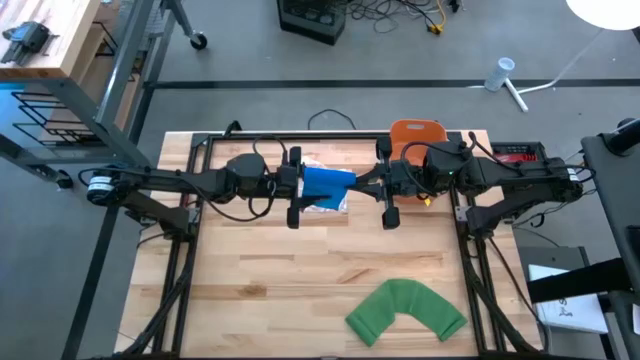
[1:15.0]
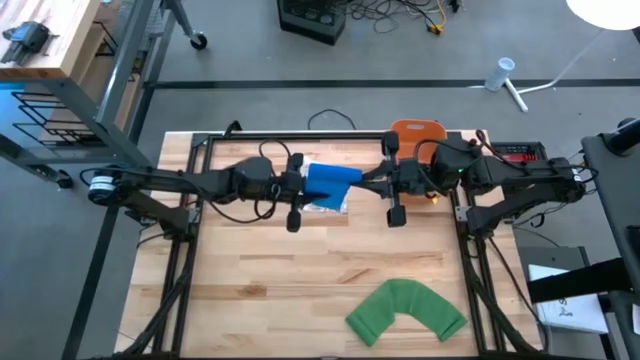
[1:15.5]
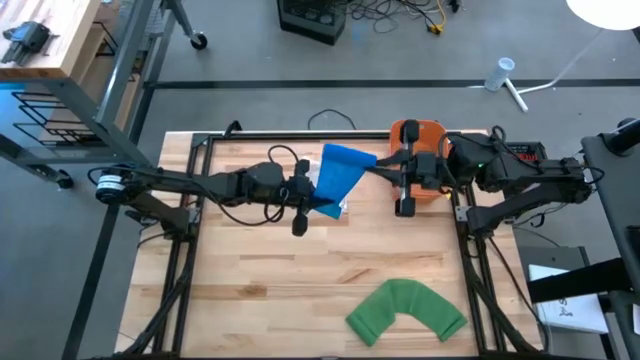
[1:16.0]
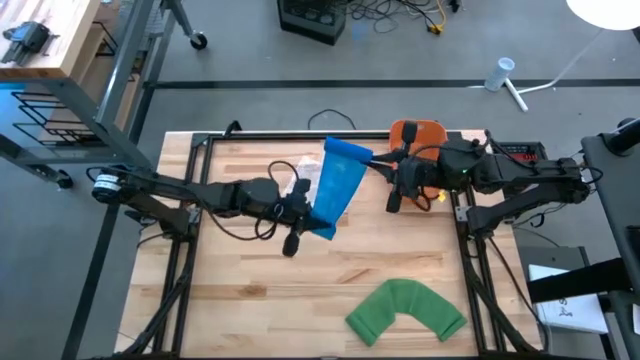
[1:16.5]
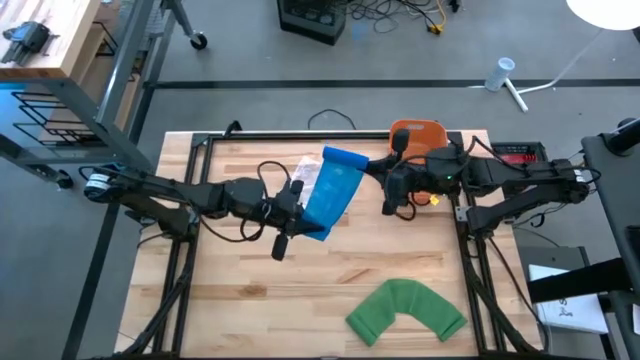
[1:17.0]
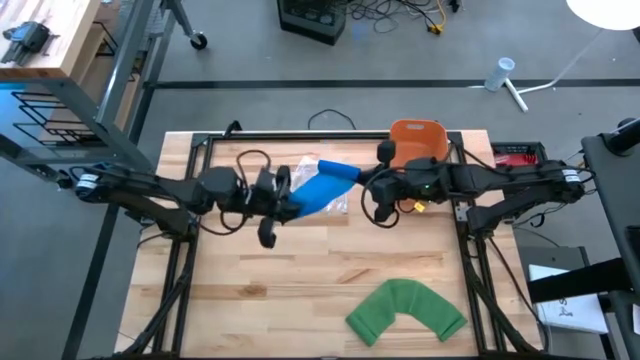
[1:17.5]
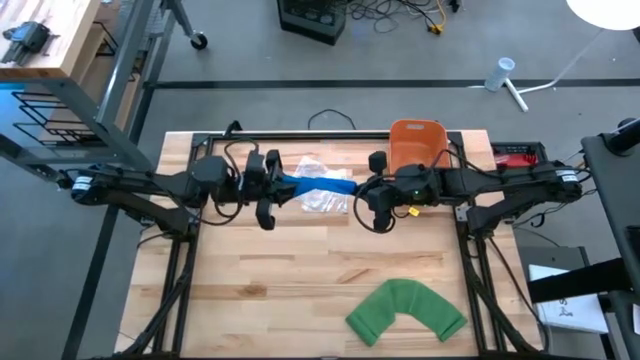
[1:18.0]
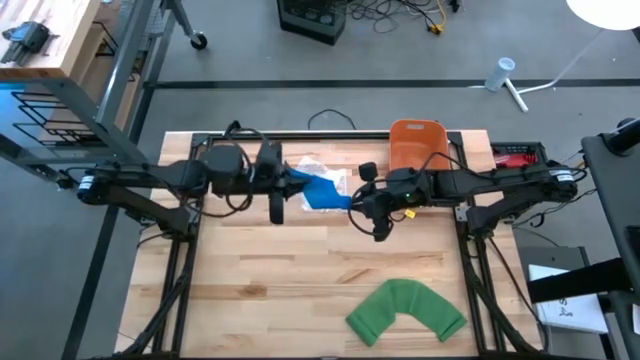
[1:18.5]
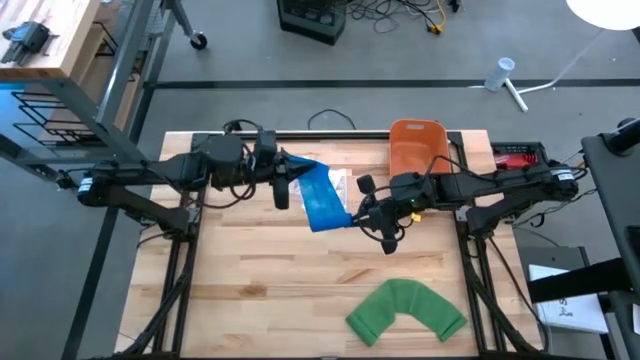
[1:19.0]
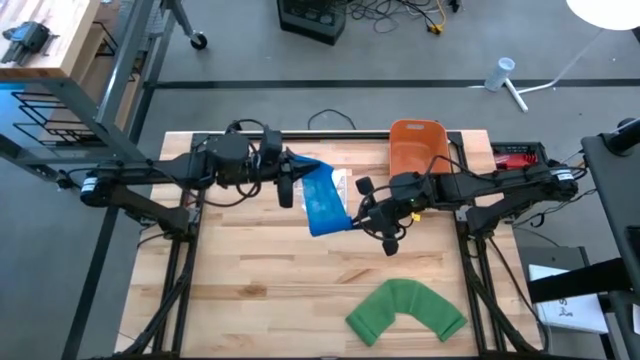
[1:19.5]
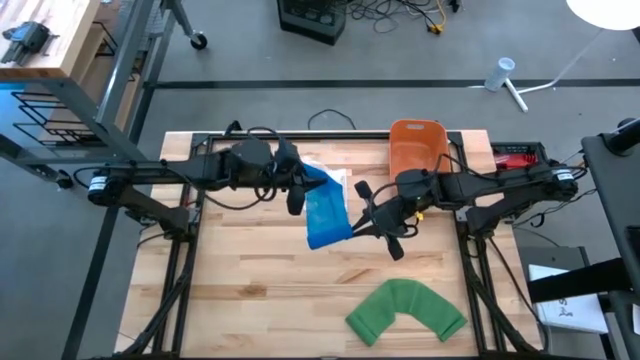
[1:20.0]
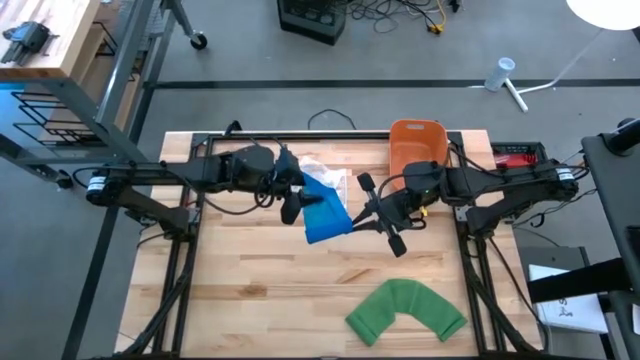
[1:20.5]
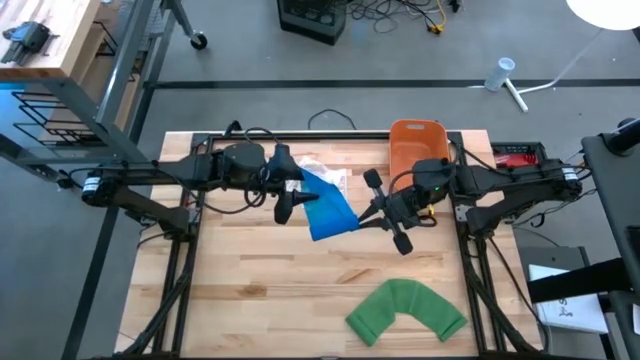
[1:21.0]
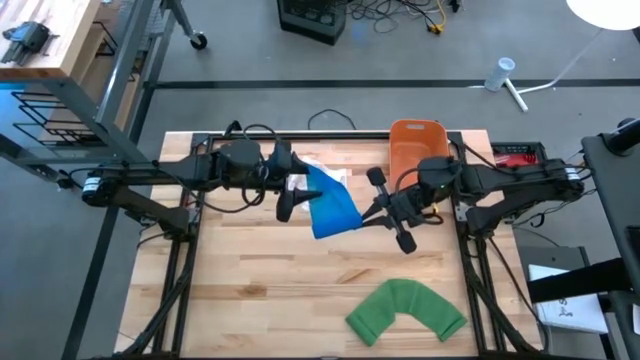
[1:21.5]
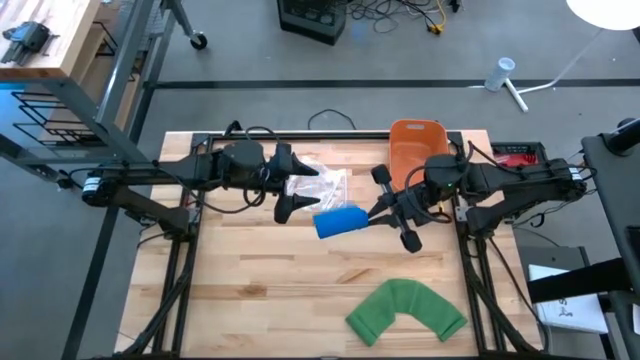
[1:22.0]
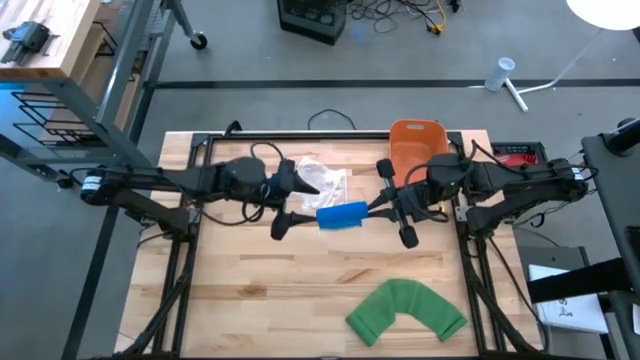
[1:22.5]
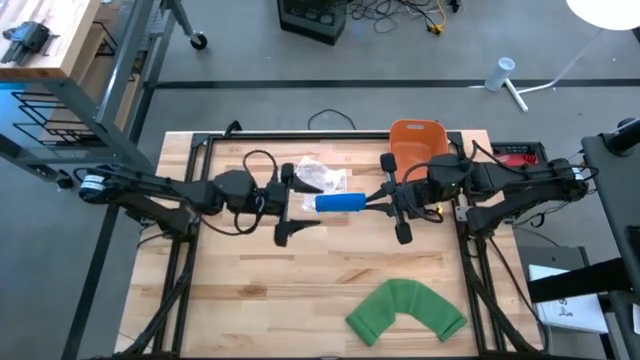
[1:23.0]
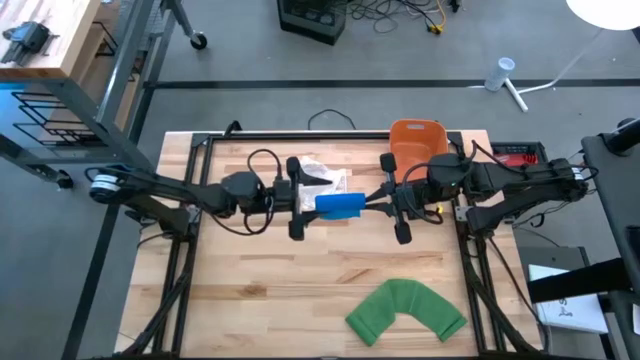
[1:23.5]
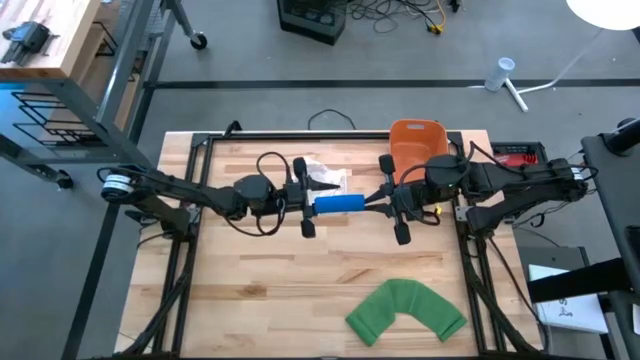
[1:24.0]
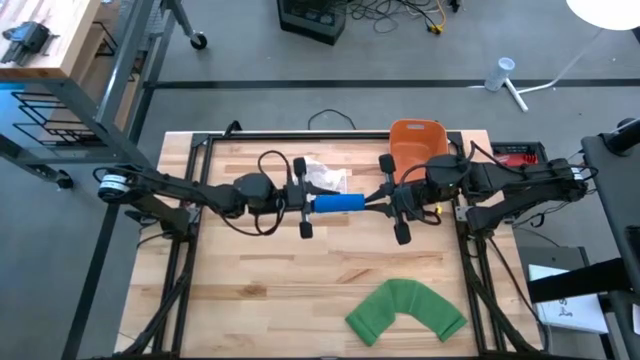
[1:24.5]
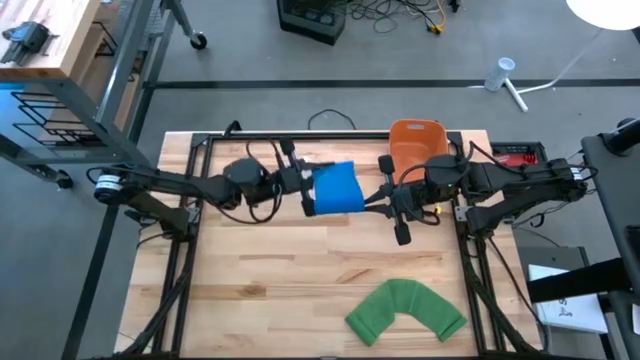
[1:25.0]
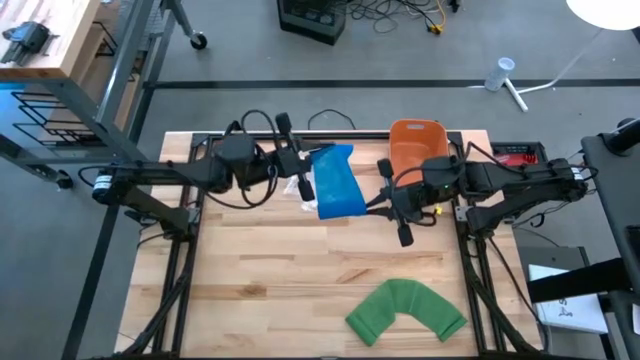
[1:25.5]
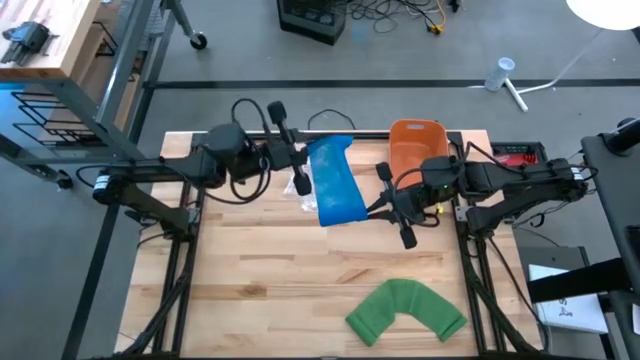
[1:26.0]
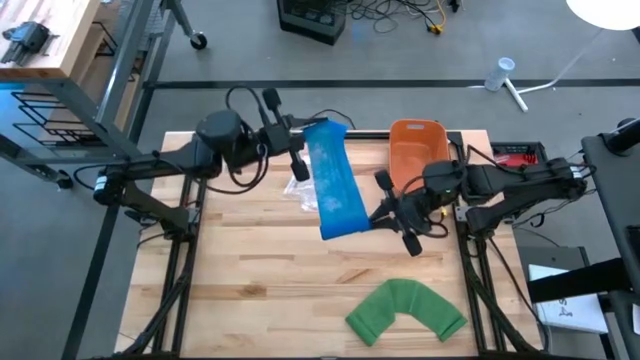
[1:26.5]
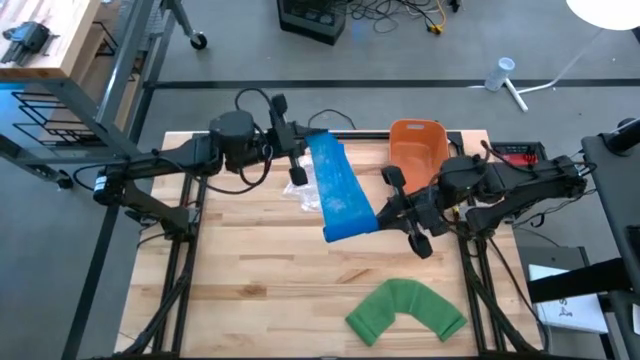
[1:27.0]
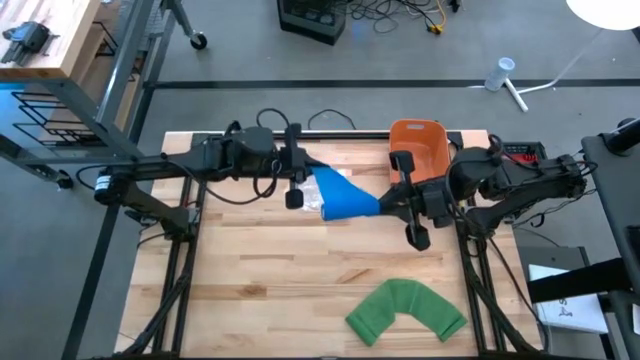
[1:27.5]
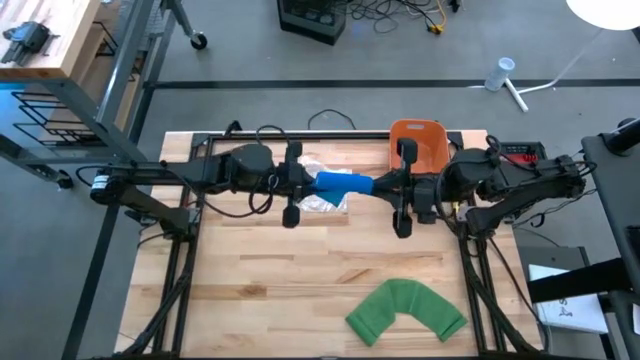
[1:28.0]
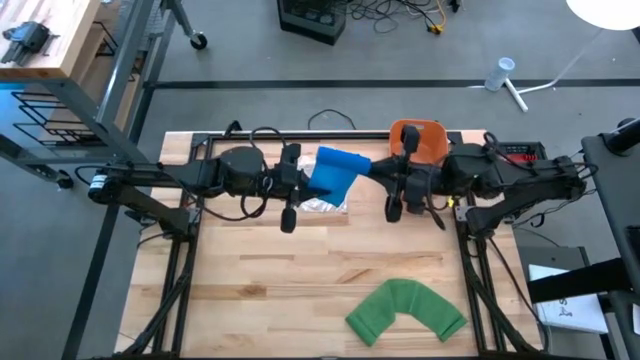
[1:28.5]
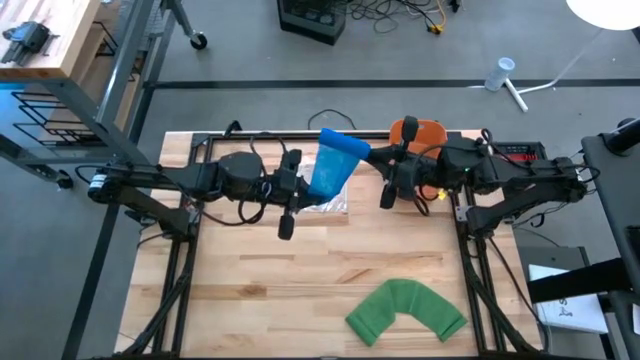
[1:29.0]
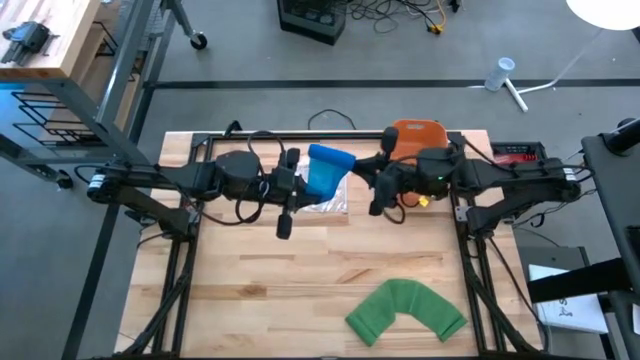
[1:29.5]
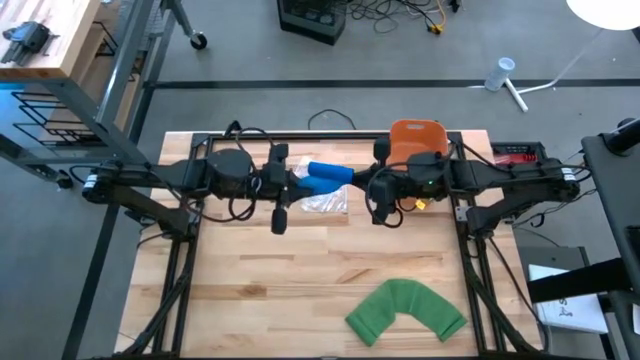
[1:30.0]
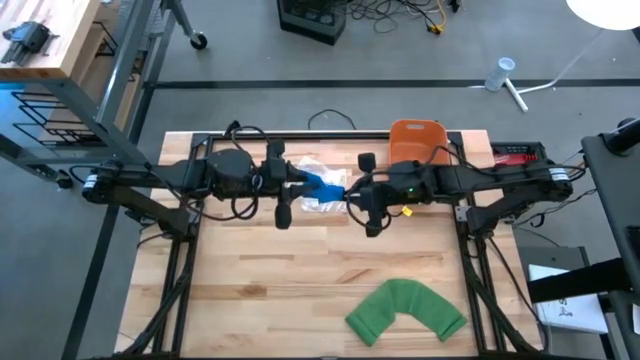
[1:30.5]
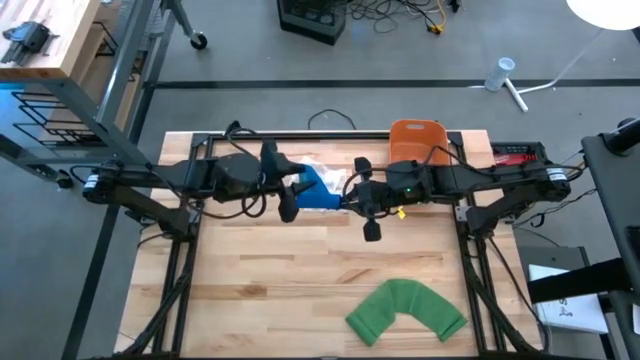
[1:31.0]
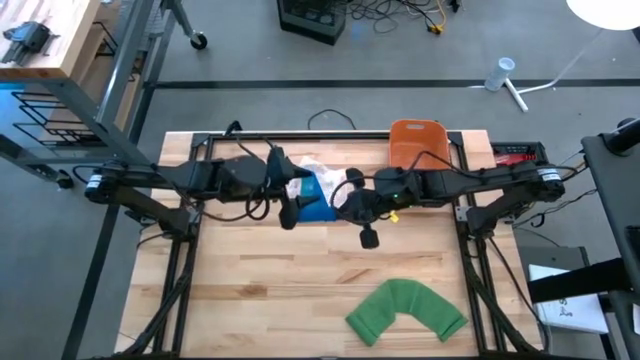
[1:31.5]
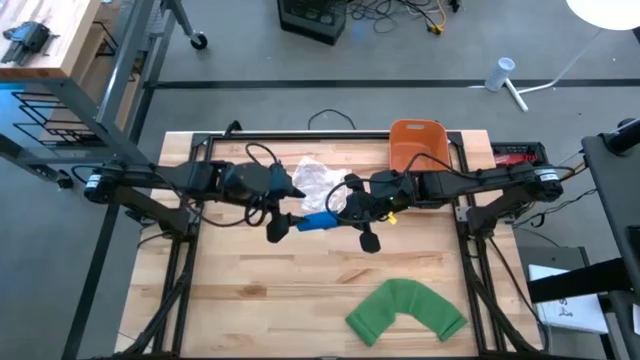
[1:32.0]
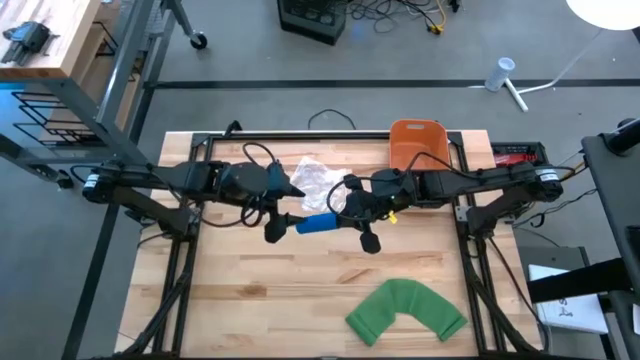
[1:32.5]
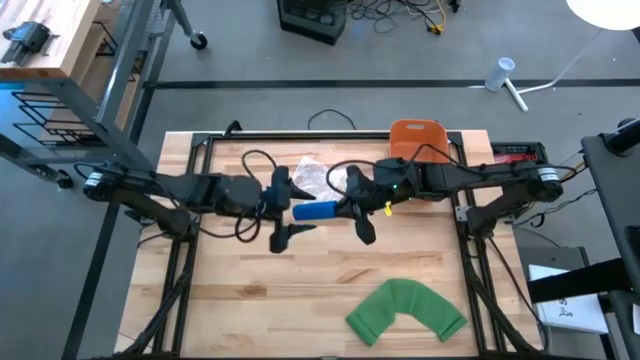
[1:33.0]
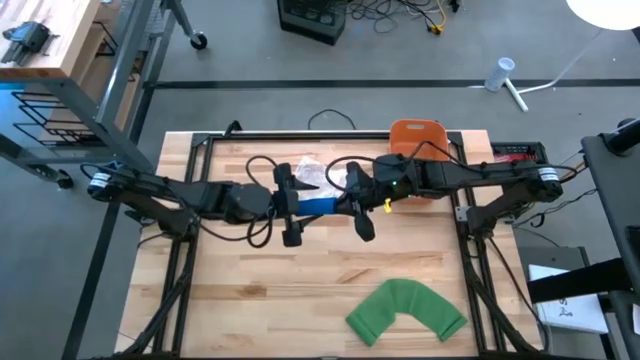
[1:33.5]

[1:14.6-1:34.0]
Task: Roll bandage
Roll the blue bandage

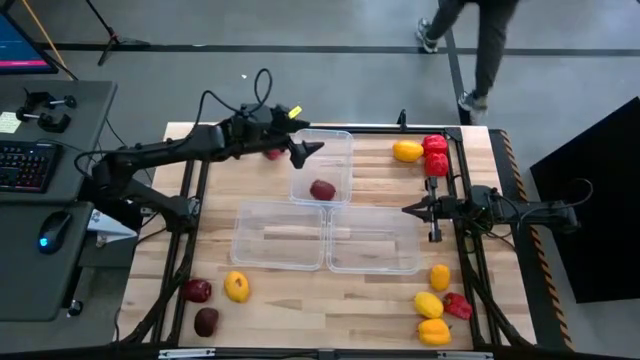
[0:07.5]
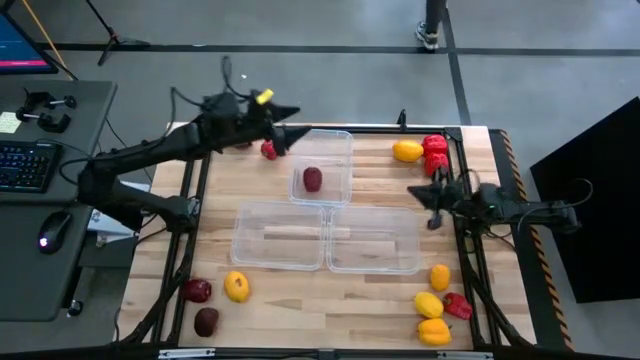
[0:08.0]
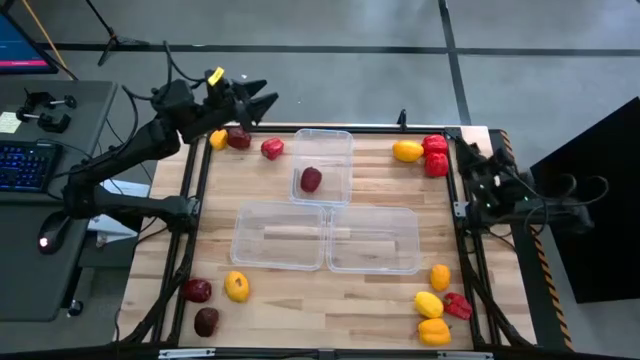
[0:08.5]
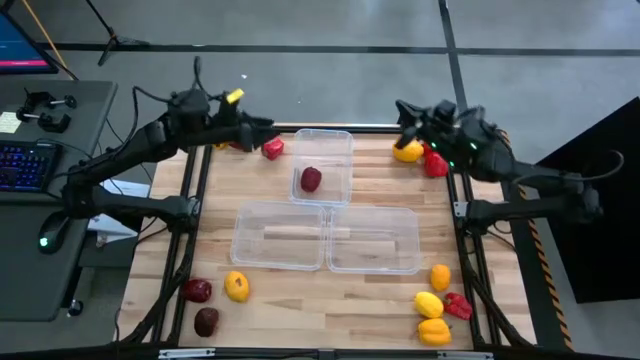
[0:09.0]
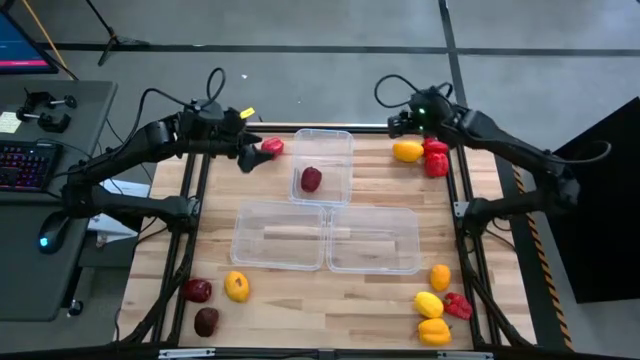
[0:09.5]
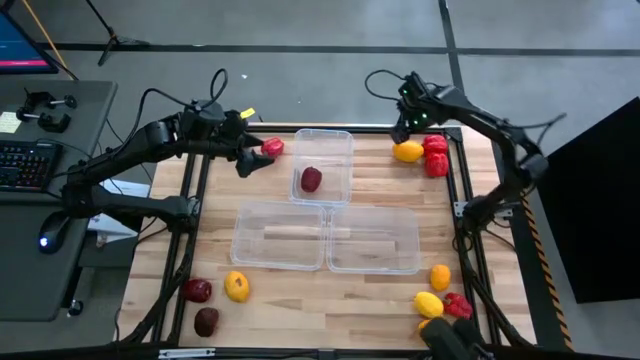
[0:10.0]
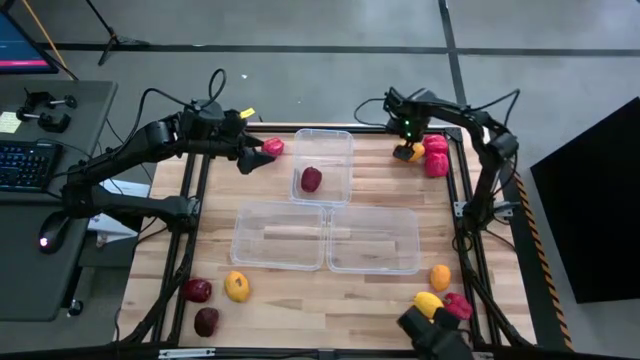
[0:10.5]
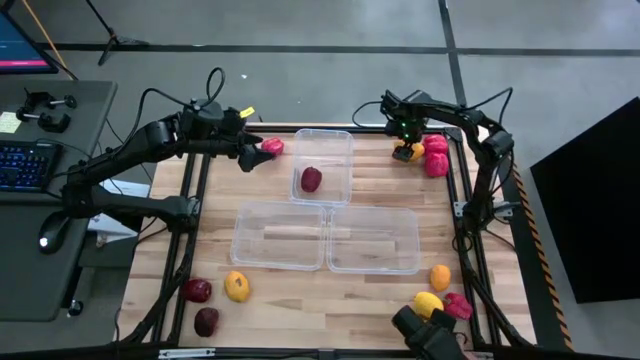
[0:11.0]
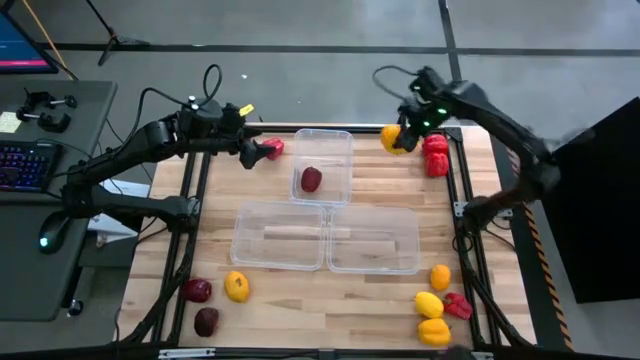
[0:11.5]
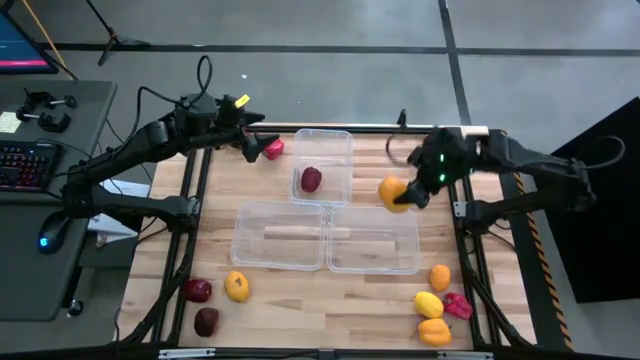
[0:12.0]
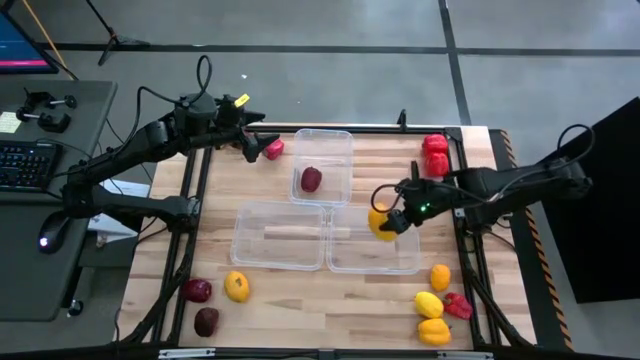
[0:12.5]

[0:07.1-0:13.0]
Task: Sort produce into baskets
Put the top right lemon into the middle right transparent bin
